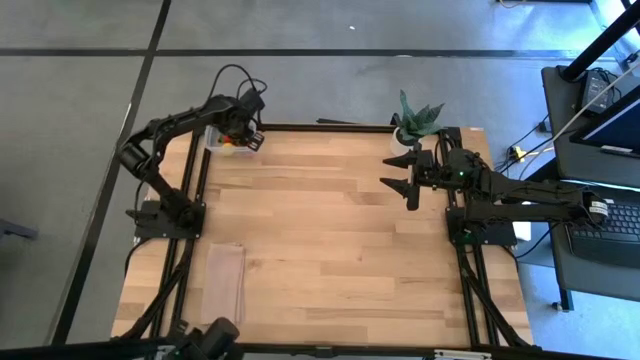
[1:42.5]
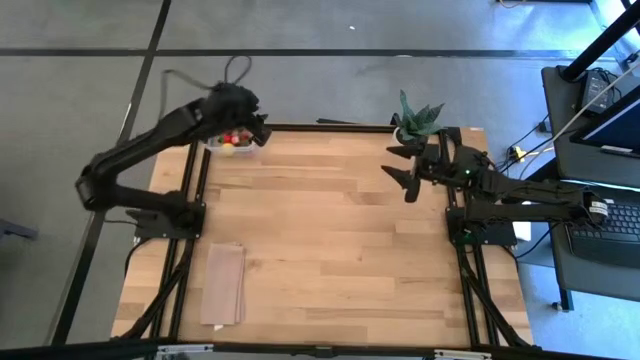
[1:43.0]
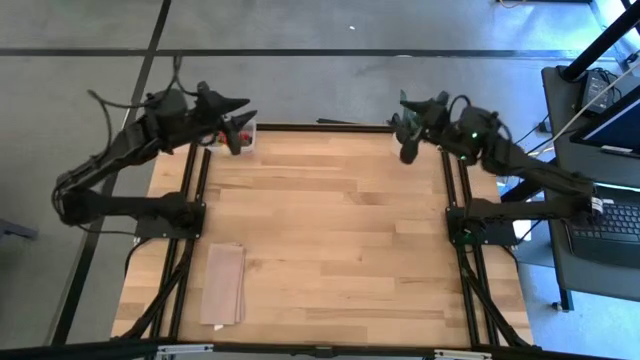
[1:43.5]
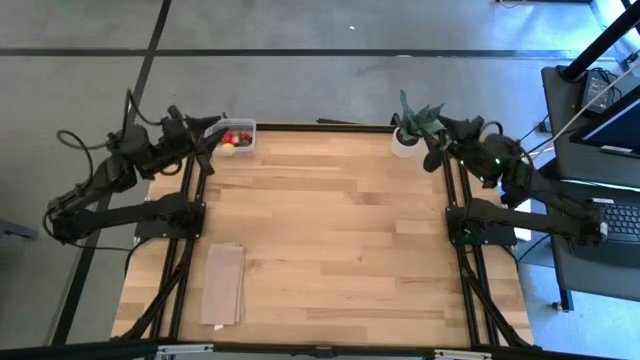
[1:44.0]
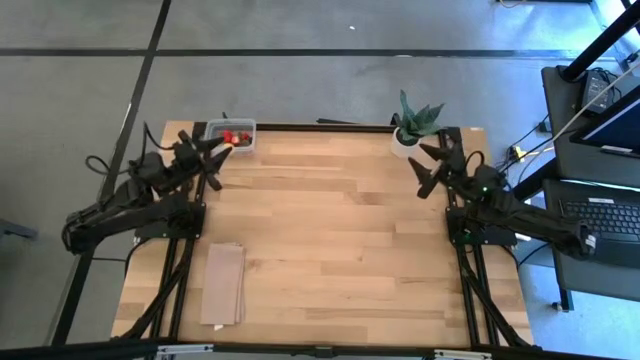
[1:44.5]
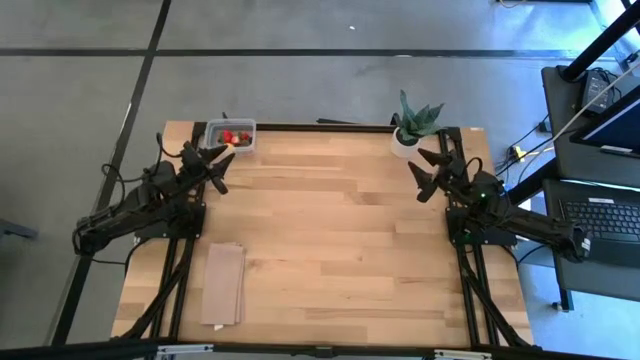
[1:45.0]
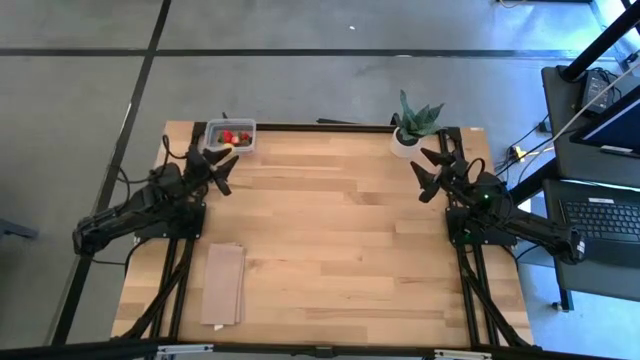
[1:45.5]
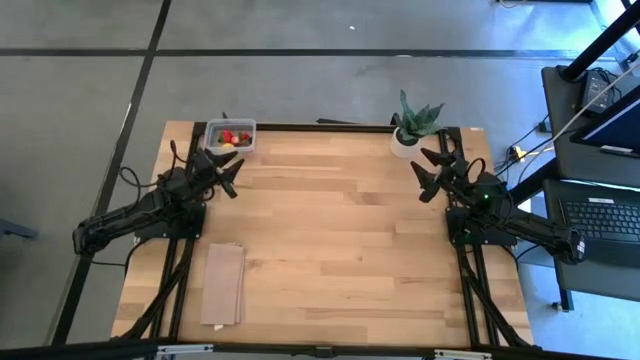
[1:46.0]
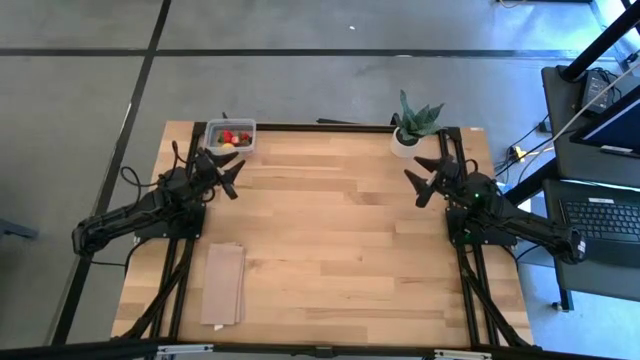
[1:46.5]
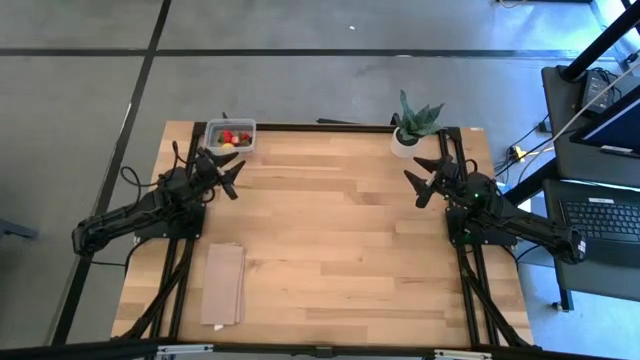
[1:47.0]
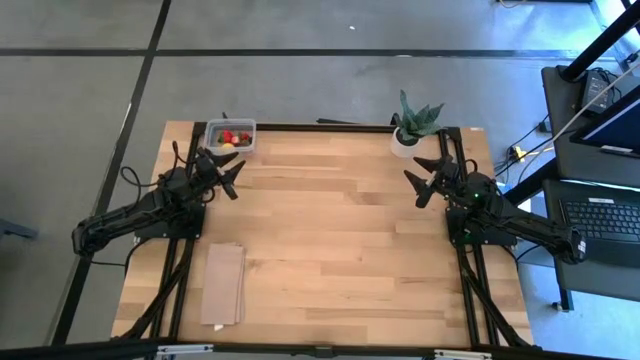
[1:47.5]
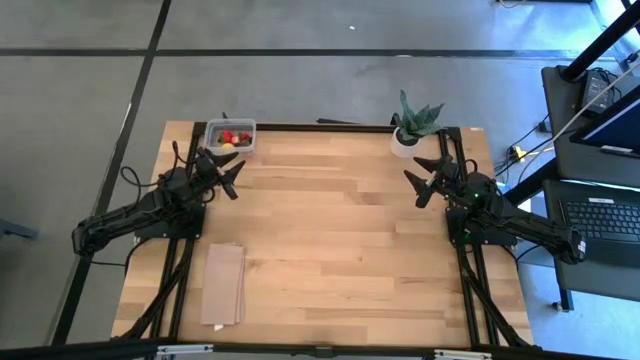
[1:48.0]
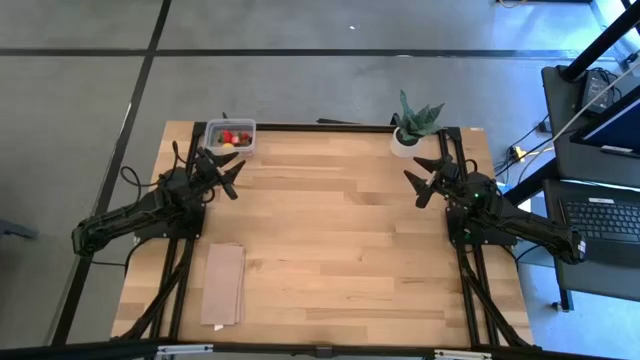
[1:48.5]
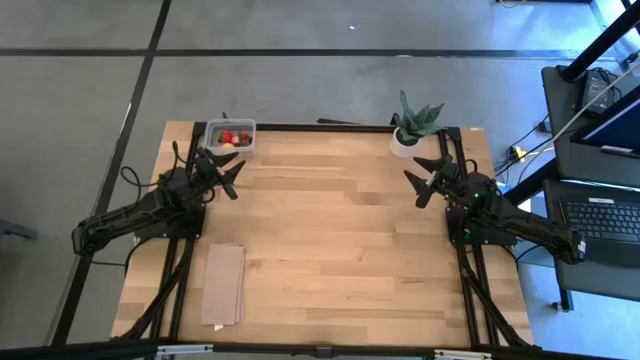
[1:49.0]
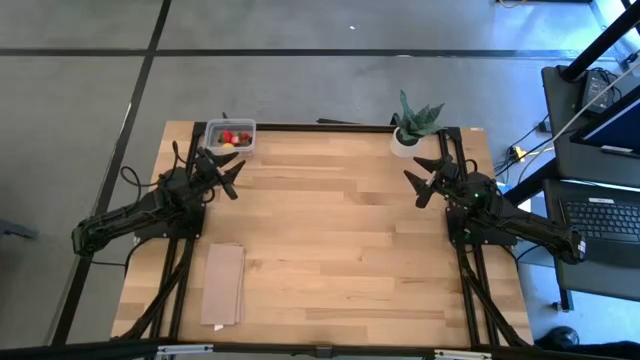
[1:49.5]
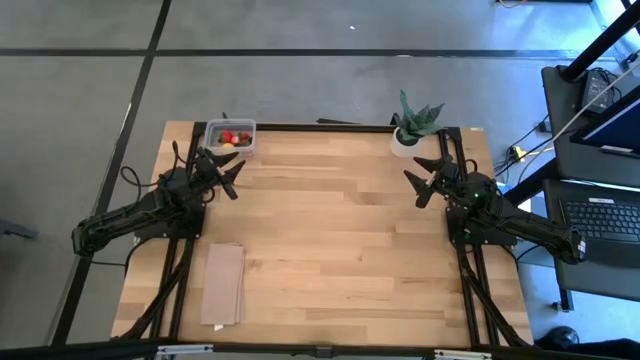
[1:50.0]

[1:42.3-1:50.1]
Task: Pick and placing Produce into tupperware
Return to Home Position

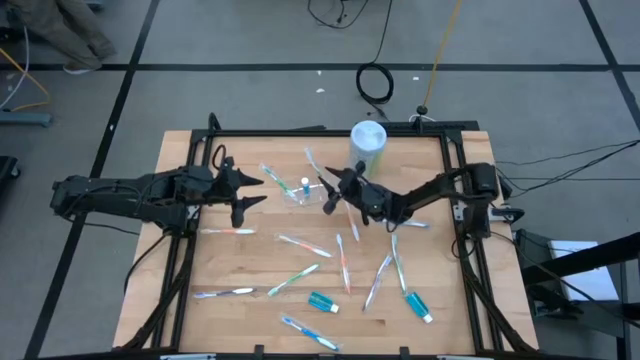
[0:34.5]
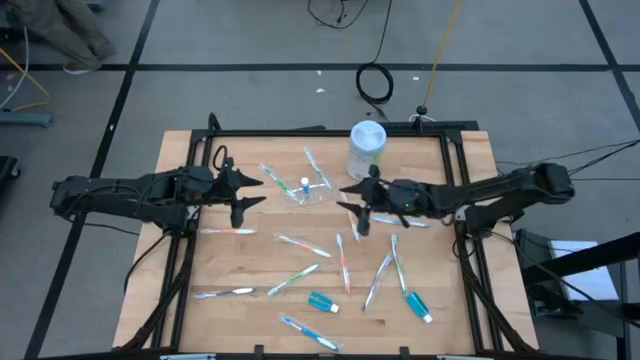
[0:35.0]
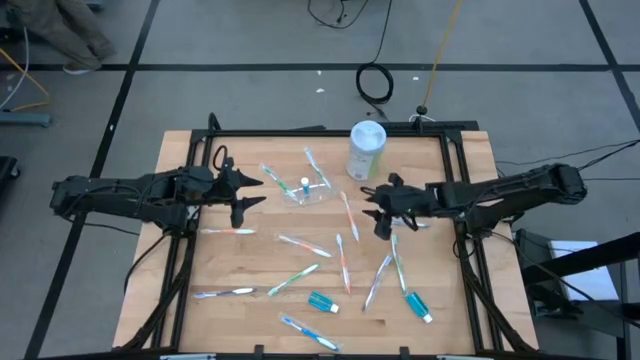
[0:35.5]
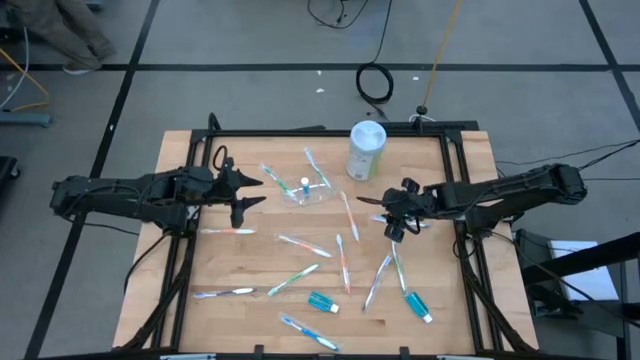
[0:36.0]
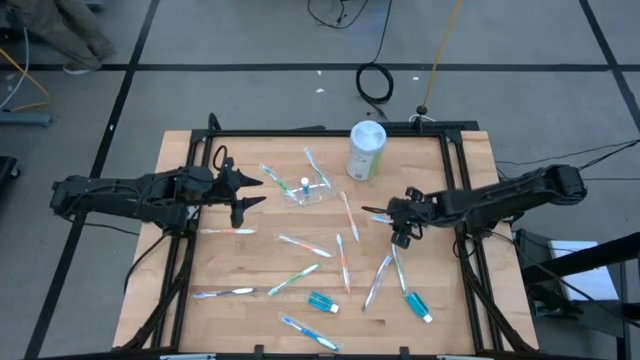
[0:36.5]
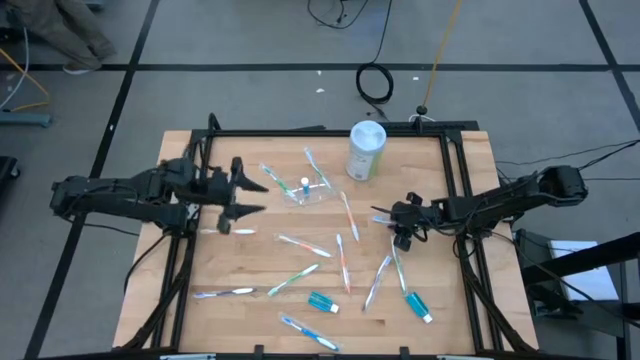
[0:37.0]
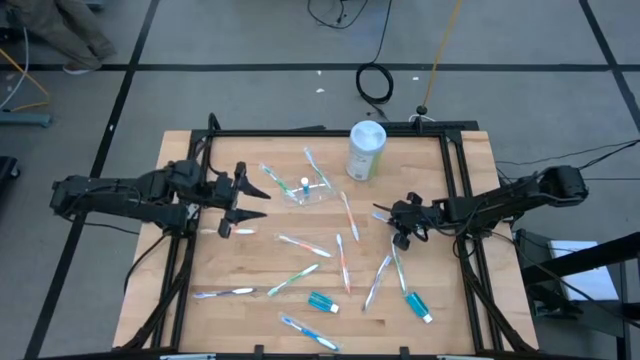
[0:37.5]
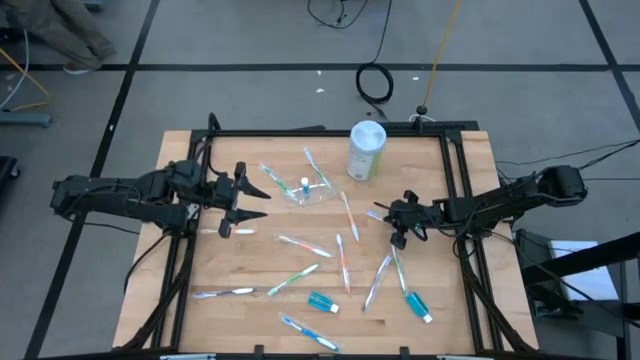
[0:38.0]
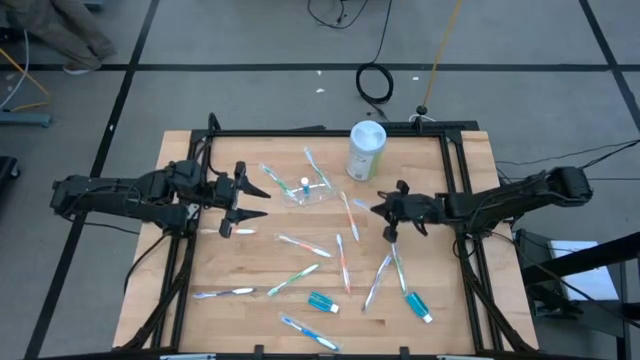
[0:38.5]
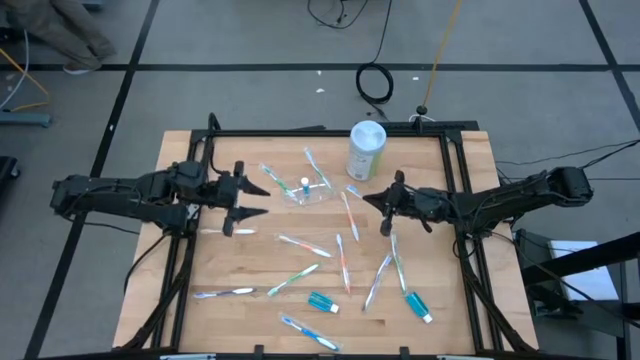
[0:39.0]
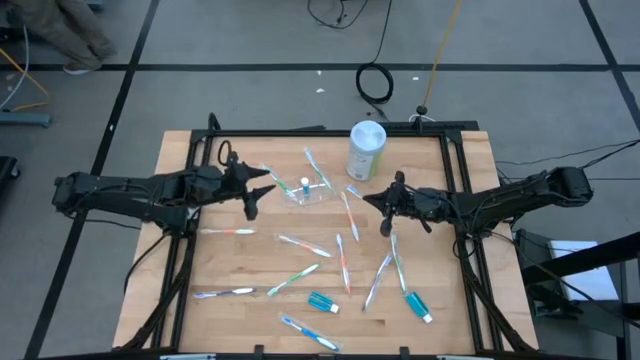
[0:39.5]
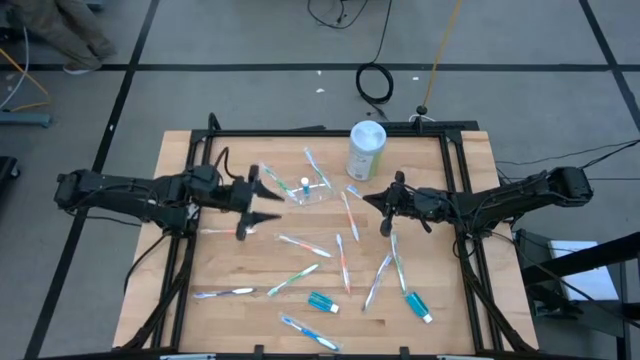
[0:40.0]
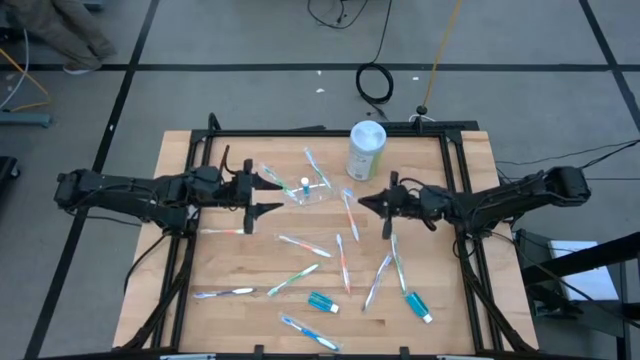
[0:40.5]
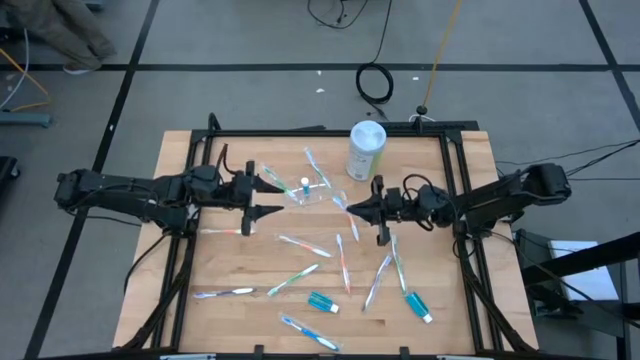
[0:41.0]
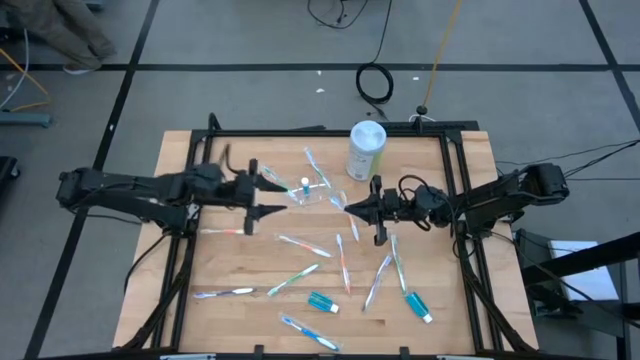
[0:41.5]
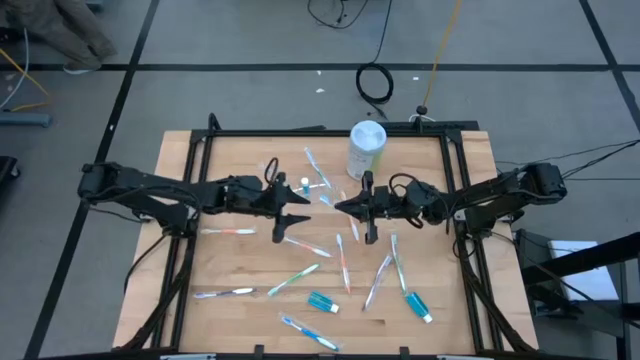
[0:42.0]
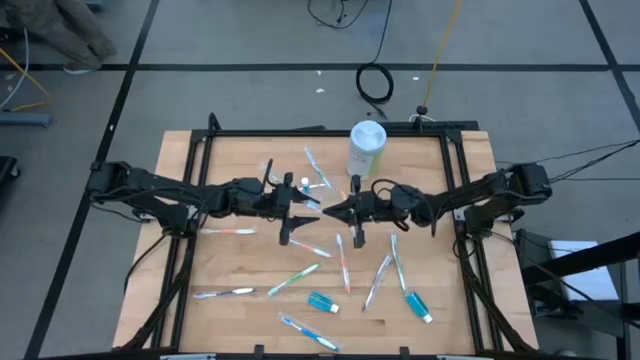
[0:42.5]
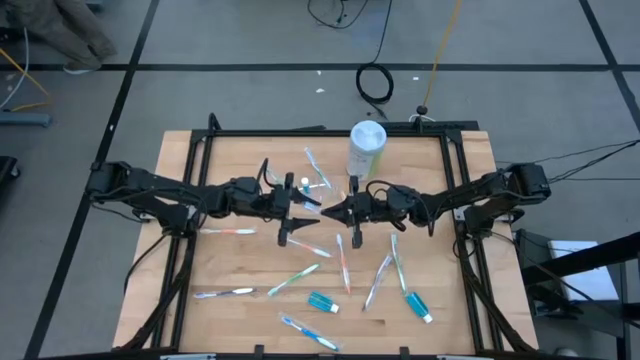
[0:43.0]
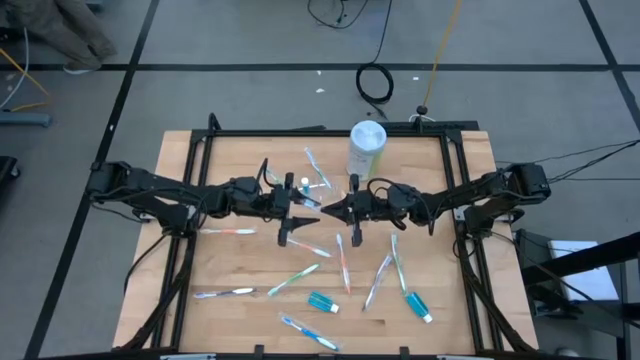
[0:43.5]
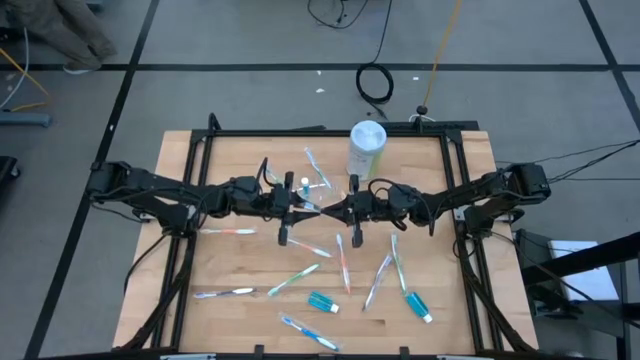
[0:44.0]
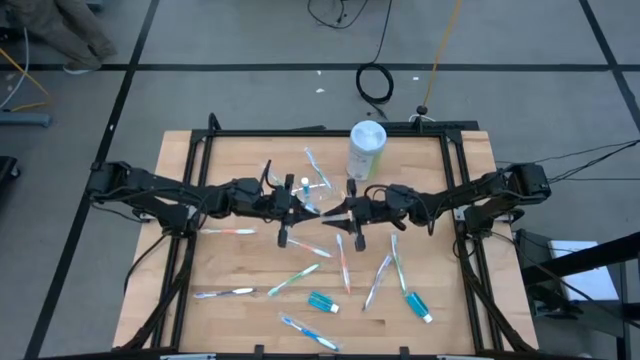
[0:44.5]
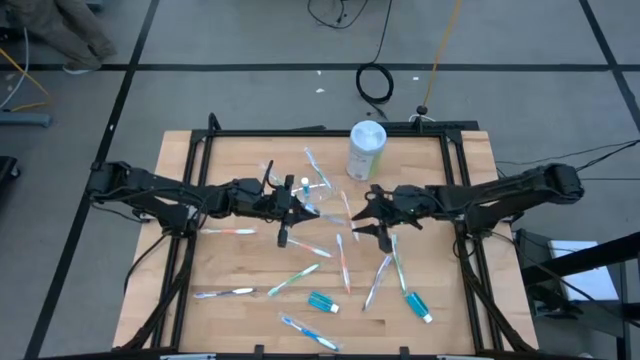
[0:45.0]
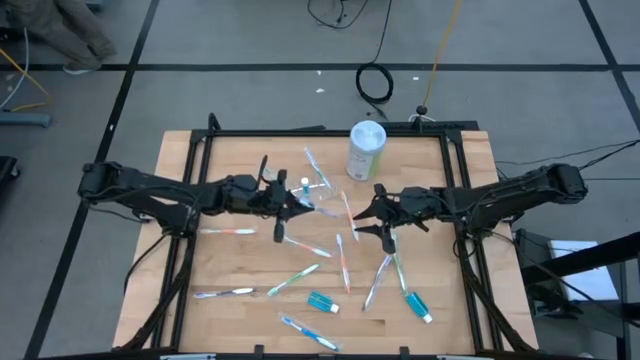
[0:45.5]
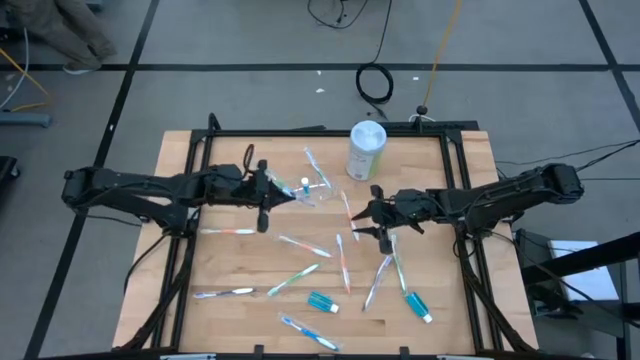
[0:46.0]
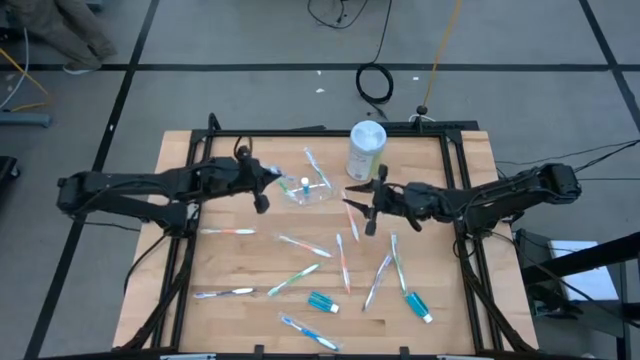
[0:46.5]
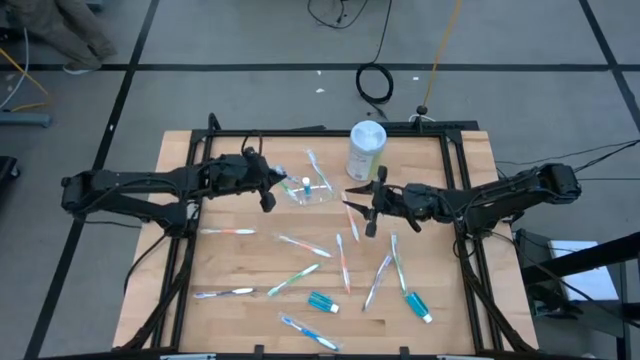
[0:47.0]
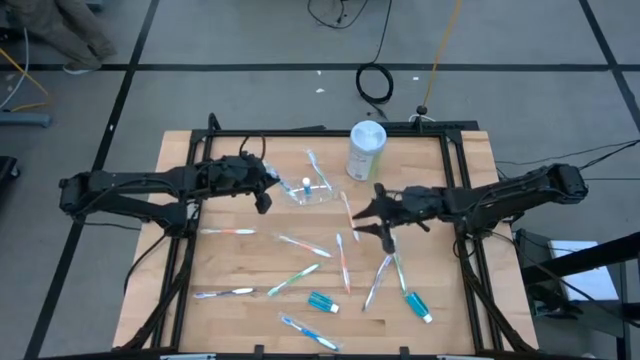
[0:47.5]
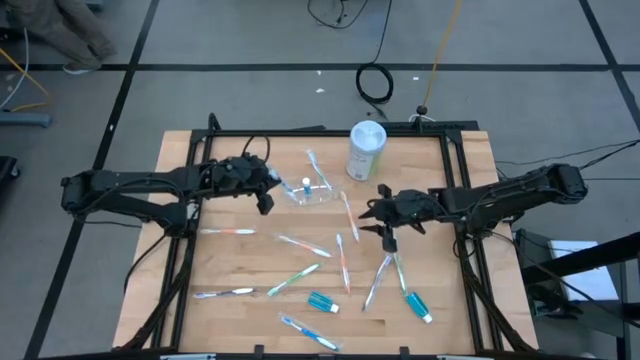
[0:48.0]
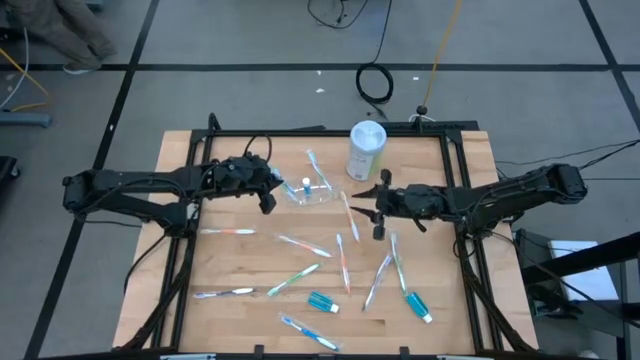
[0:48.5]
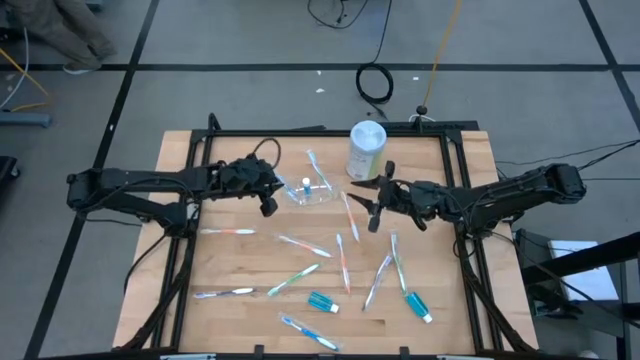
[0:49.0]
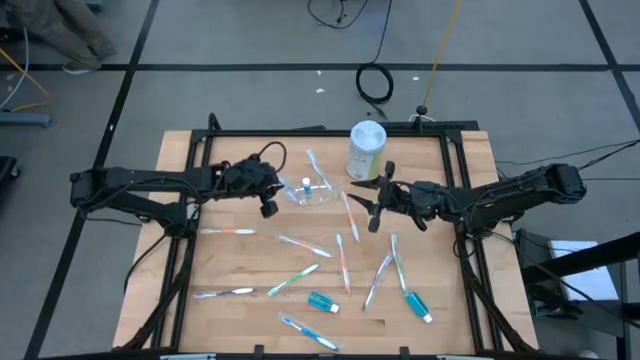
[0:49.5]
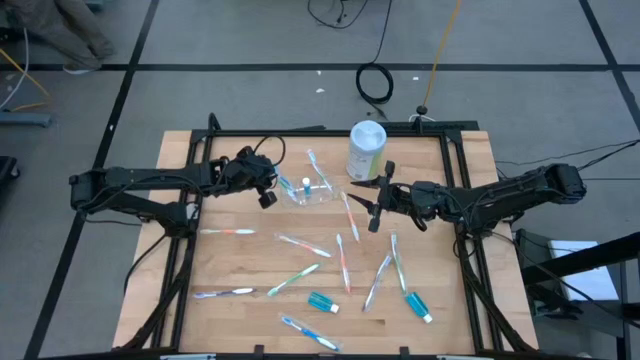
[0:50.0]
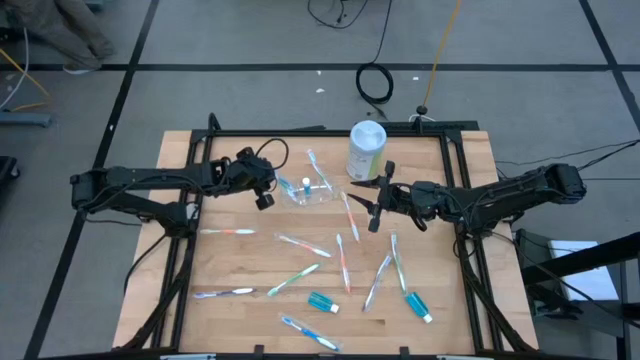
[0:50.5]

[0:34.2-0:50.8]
Task: Pick & Place toothbrushing station
Put the blue toothbrush into the transparent organizer
